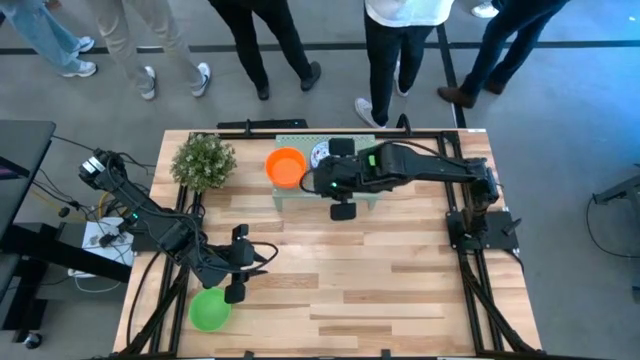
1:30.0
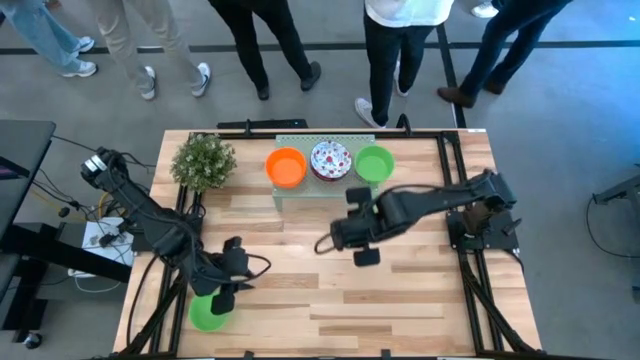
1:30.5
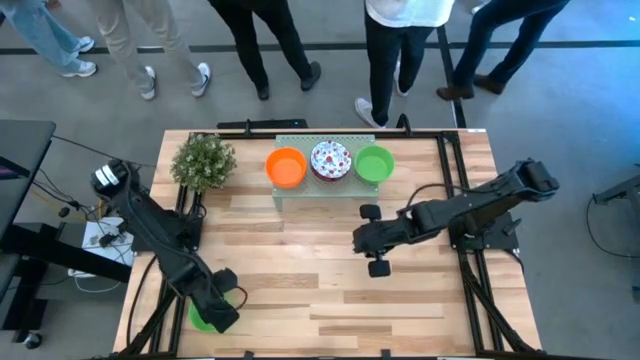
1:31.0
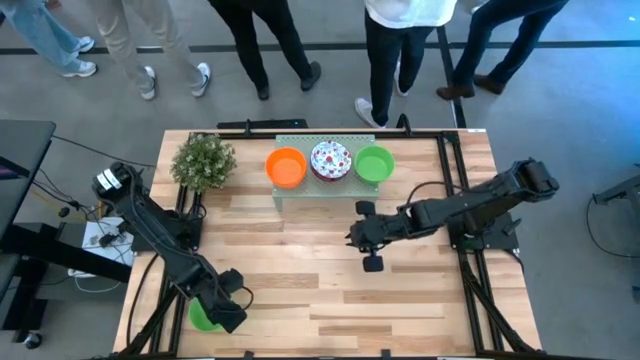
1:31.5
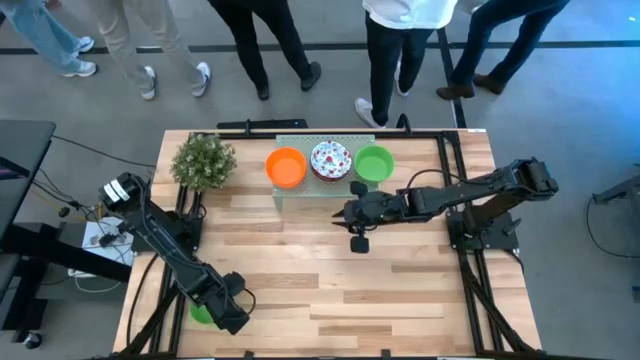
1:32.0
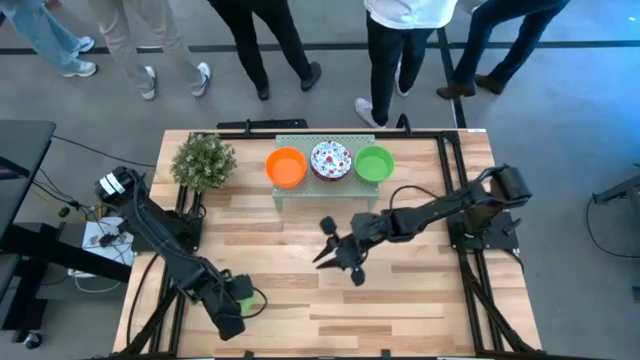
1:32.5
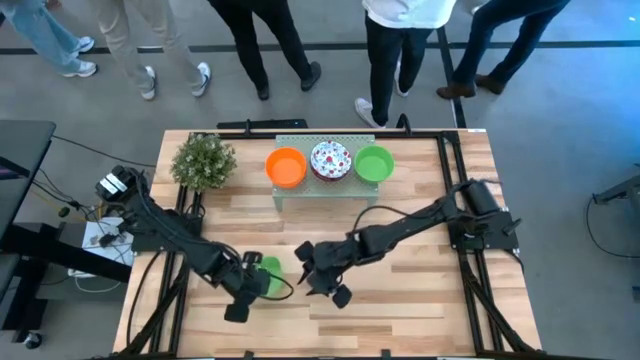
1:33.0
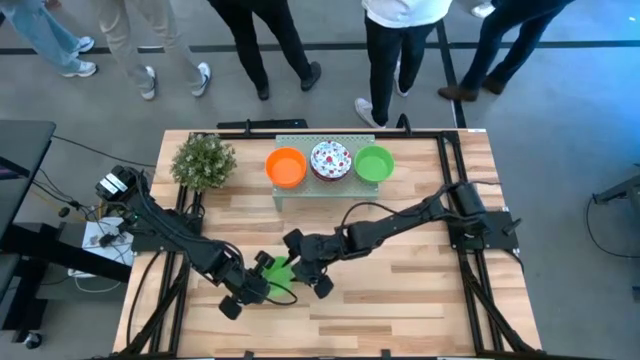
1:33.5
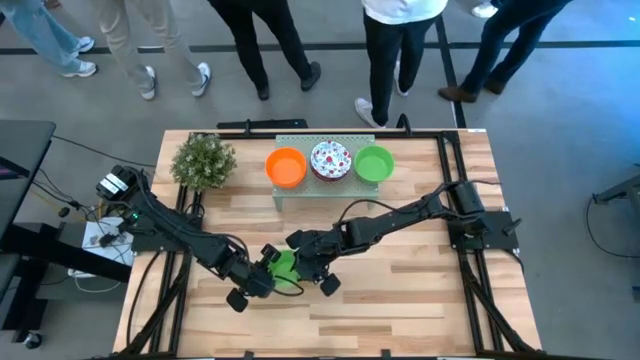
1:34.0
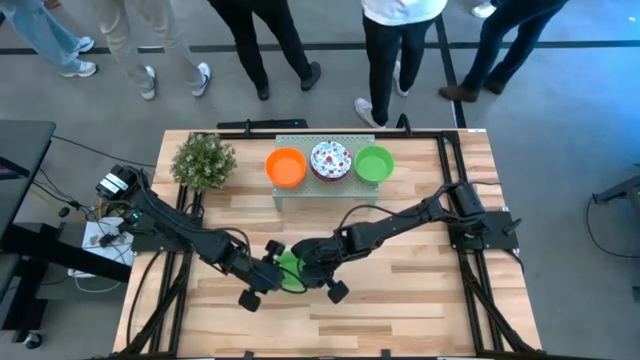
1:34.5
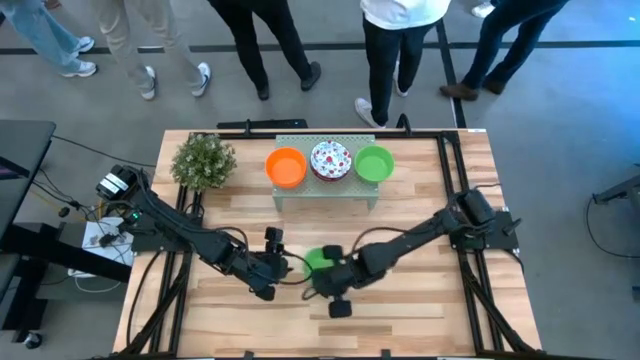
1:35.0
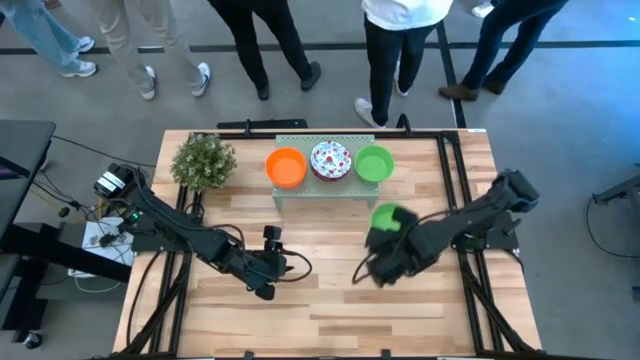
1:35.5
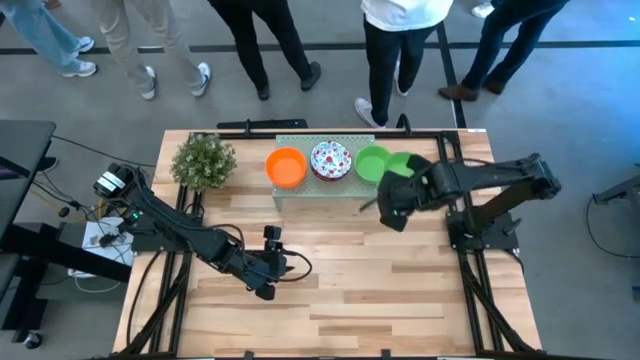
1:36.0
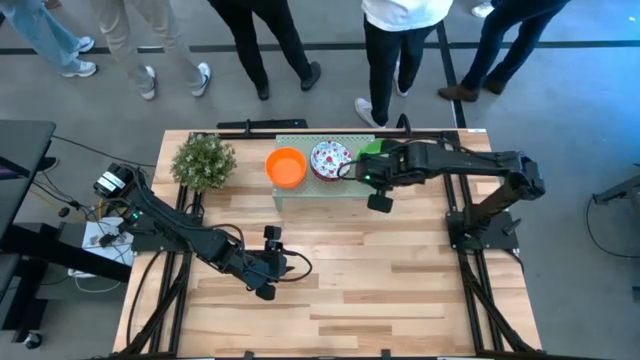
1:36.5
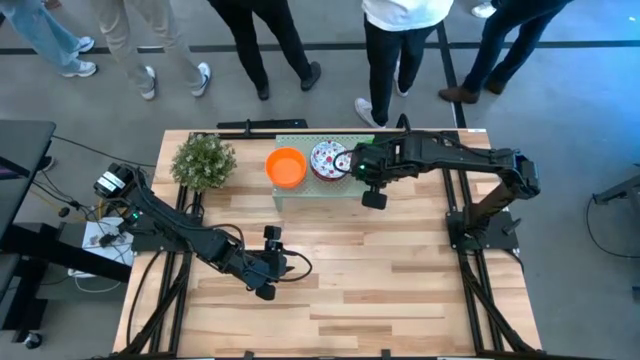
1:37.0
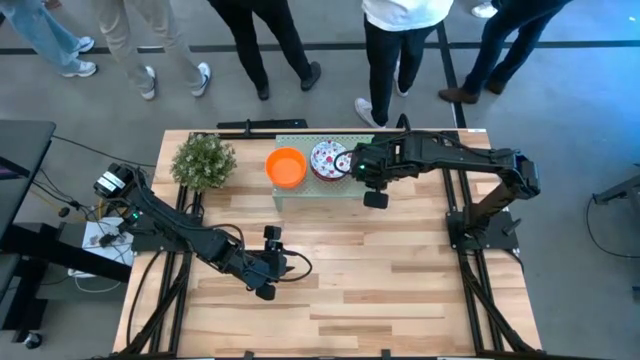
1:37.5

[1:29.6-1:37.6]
Task: Pick & Place Mini bowls
Stack the green bowl onto the stacked green bowls on the shelf

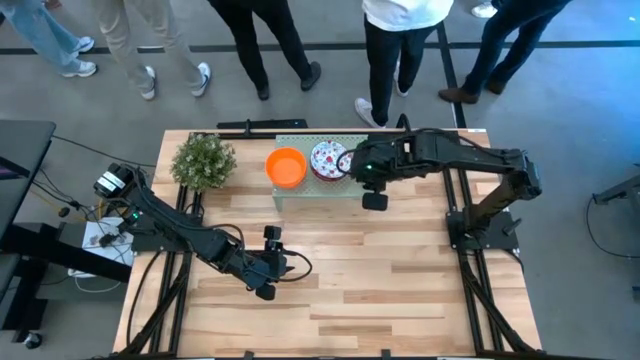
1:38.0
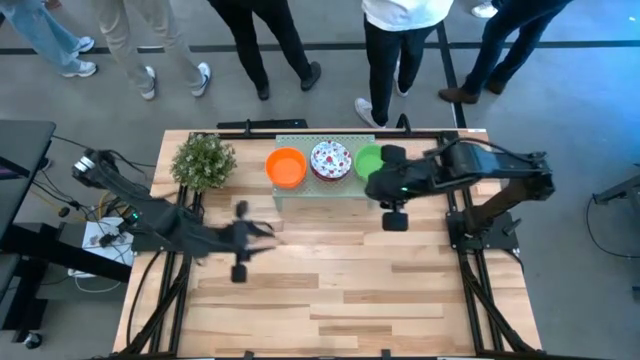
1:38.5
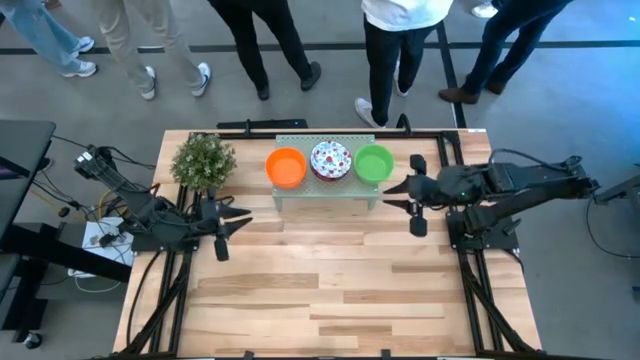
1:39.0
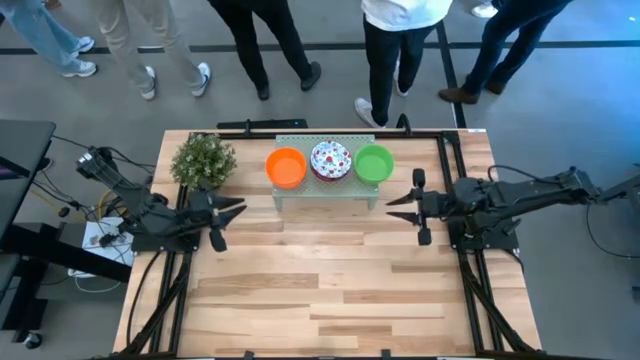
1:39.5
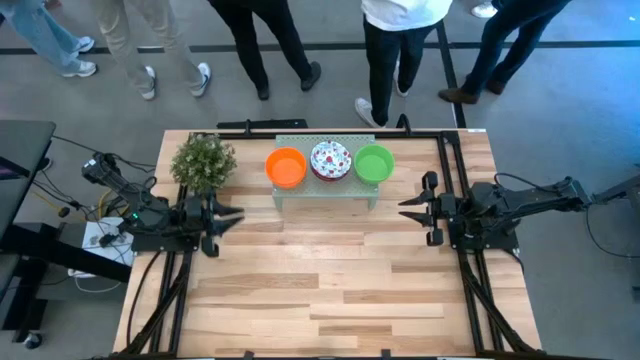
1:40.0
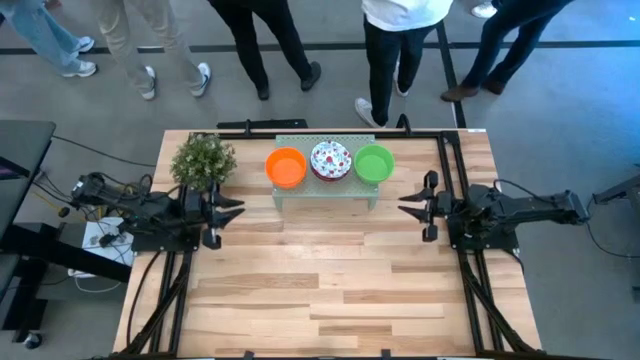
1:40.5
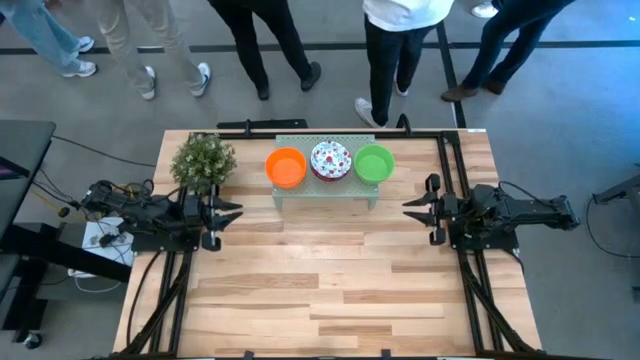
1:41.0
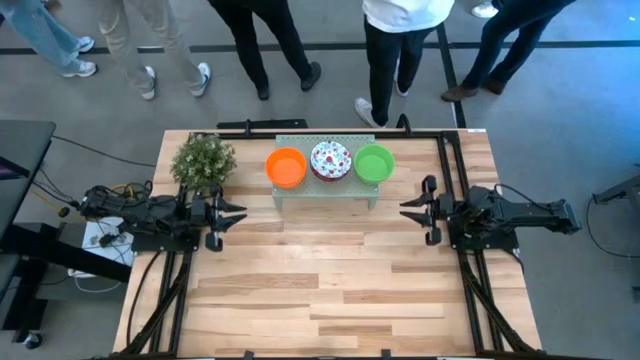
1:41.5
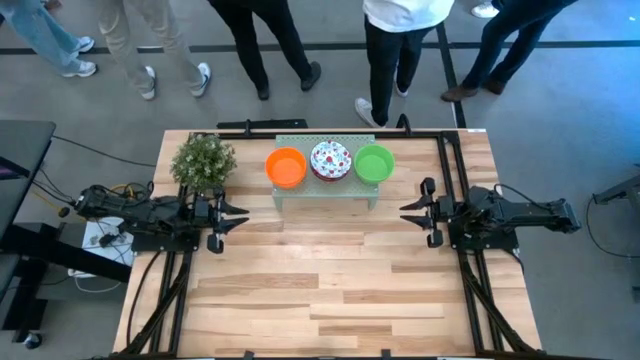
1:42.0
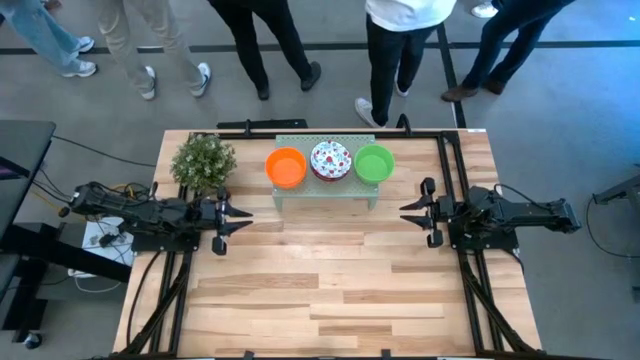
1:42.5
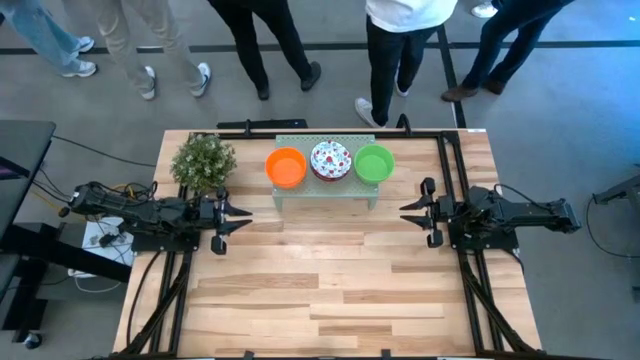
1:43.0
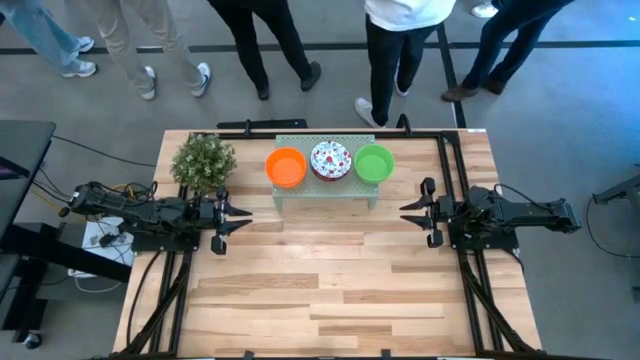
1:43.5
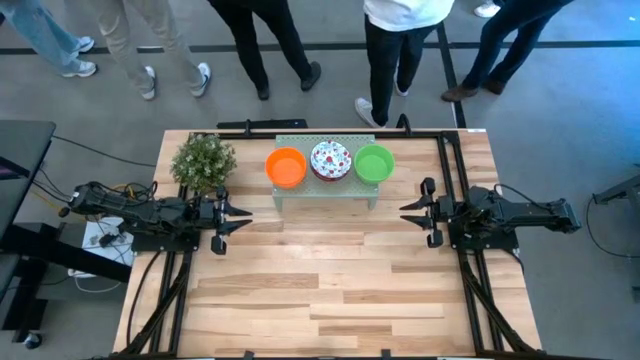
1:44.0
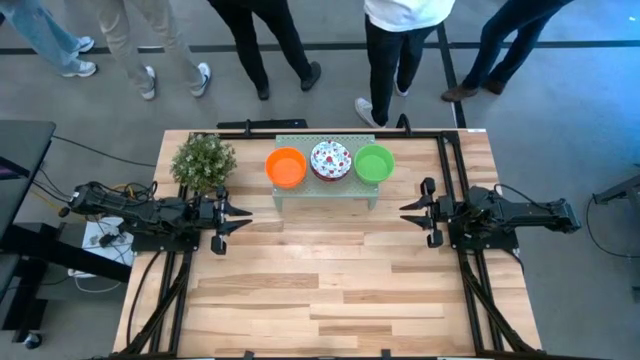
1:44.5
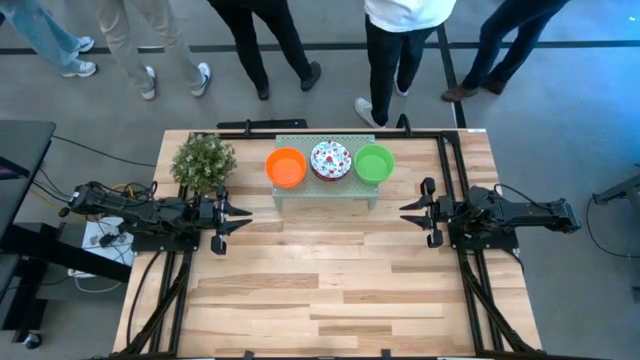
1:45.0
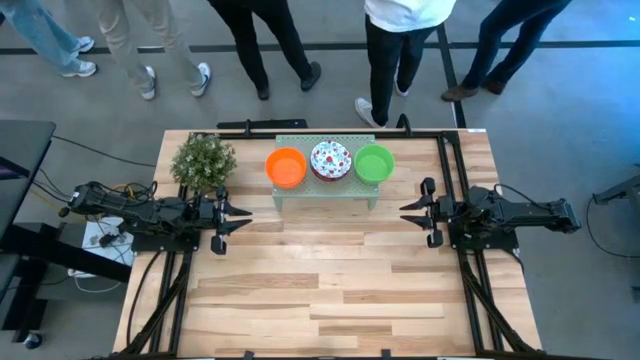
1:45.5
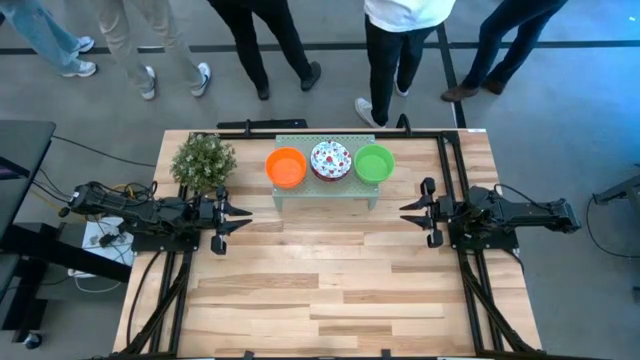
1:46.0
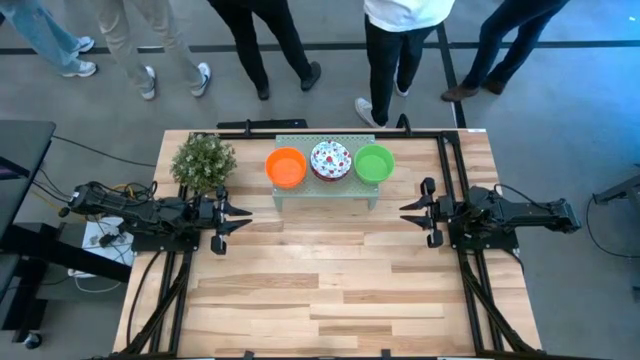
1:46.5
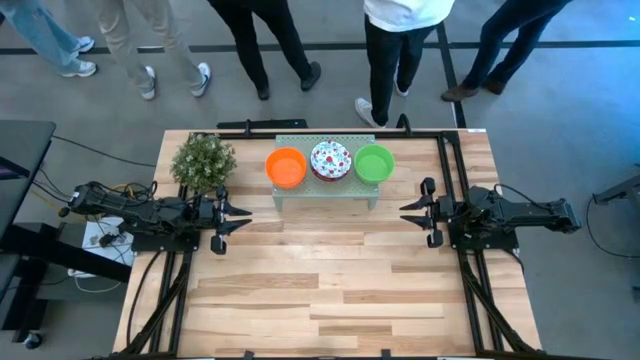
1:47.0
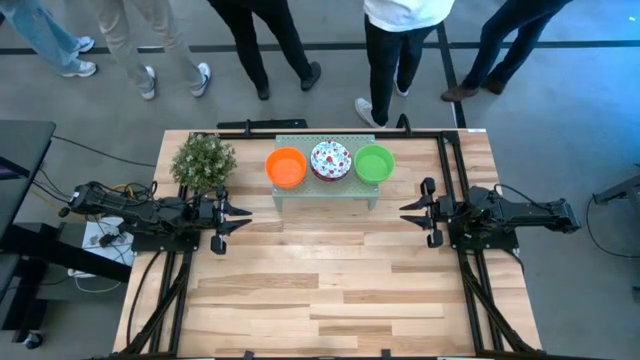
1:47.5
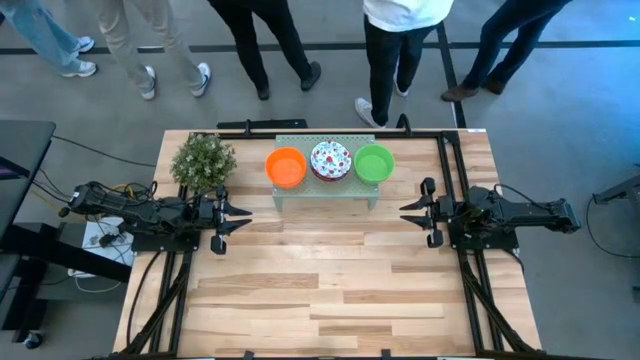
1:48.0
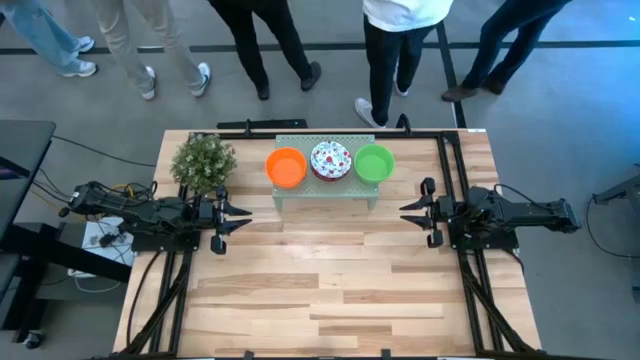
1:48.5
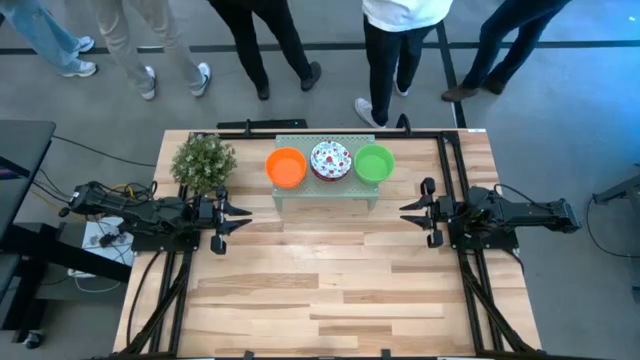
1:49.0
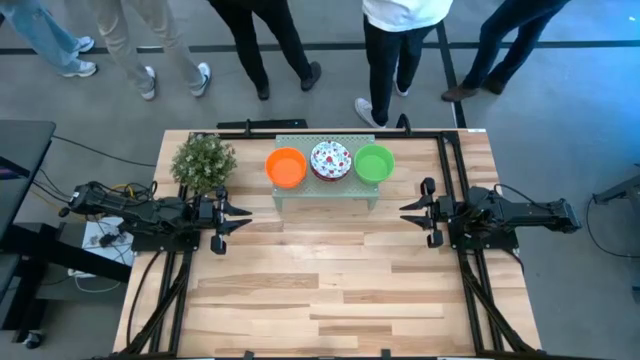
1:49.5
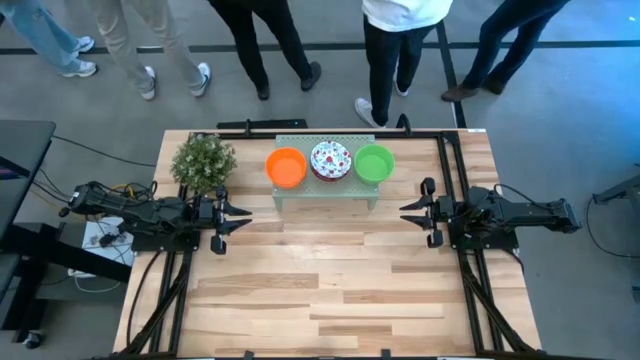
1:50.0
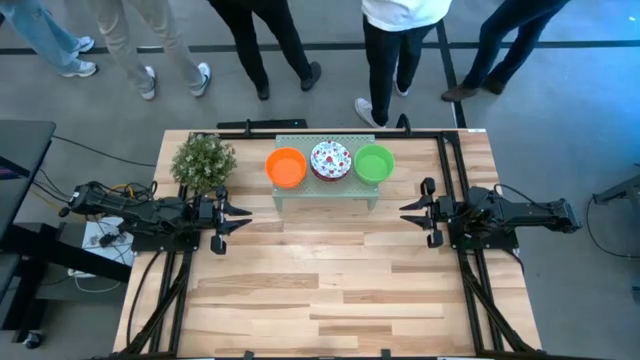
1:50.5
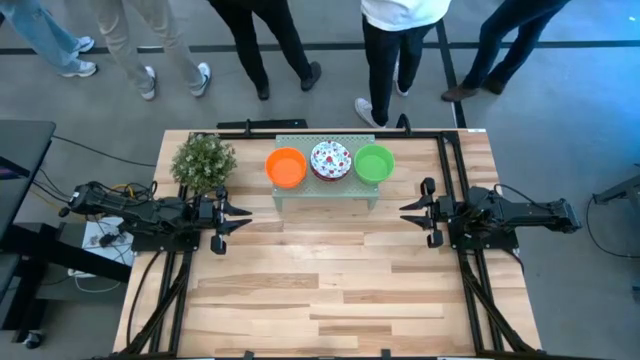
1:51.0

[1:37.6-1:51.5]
Return to Home Position
